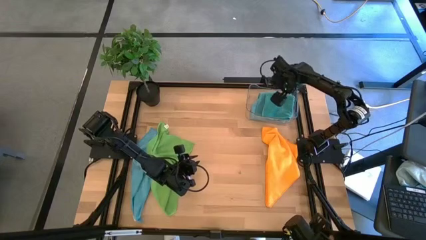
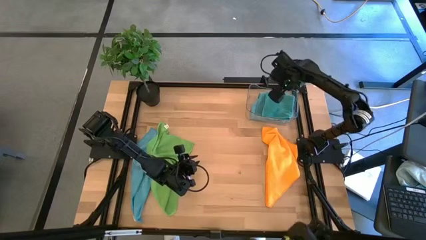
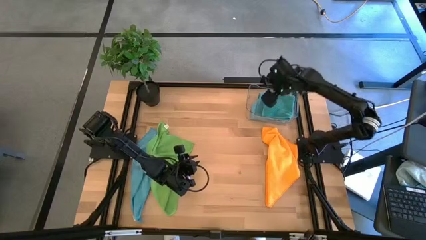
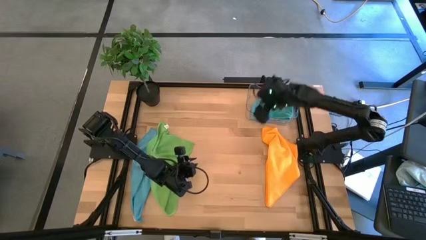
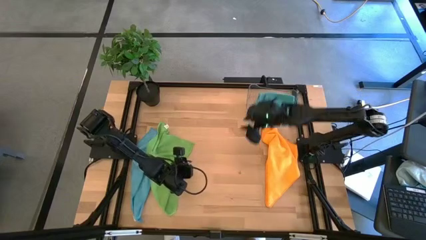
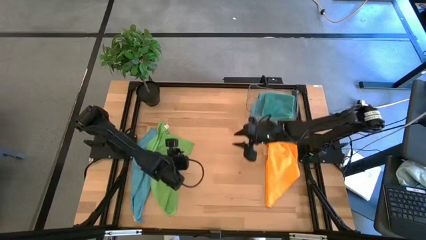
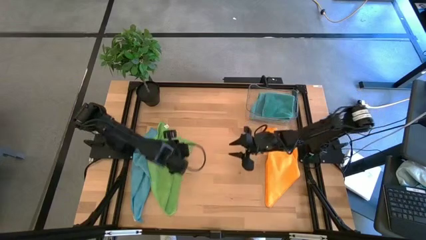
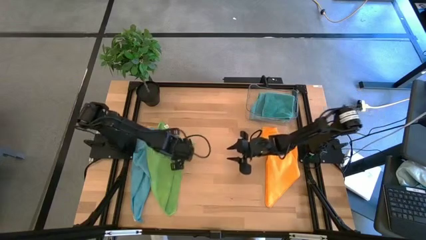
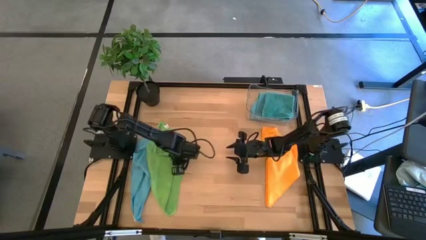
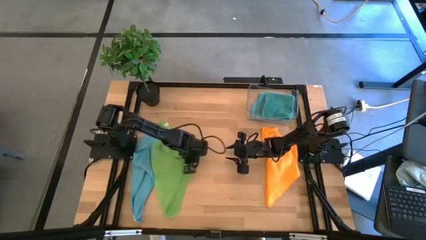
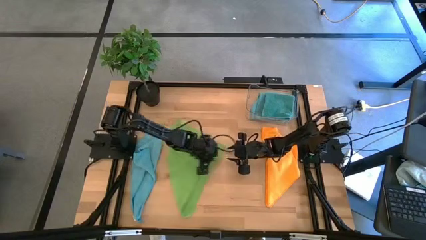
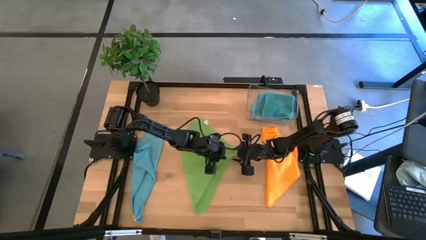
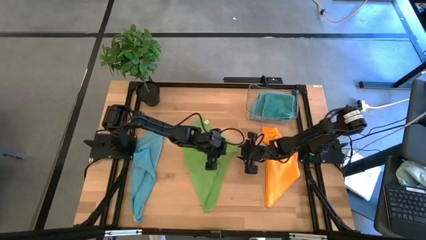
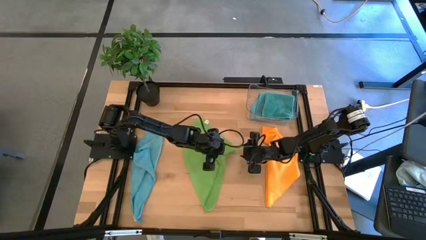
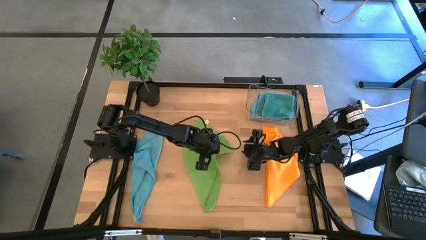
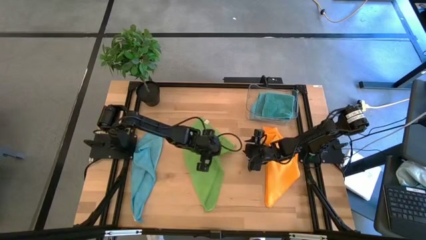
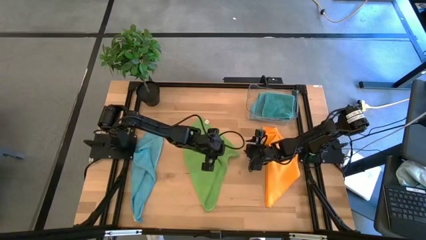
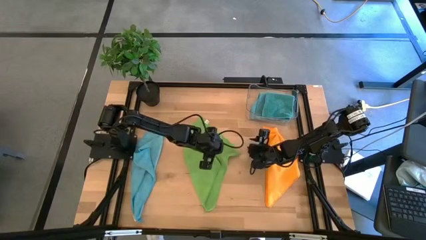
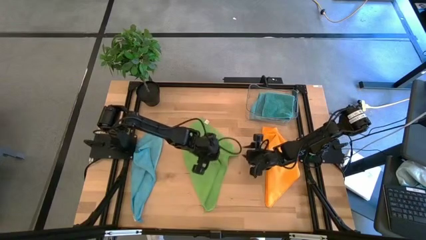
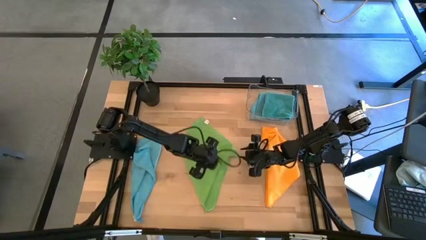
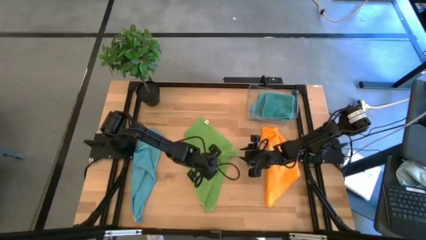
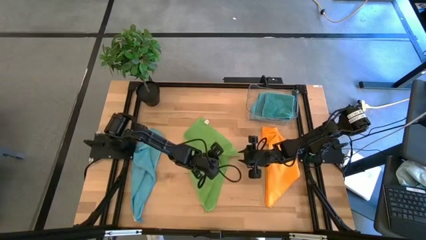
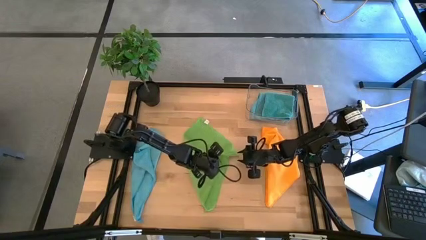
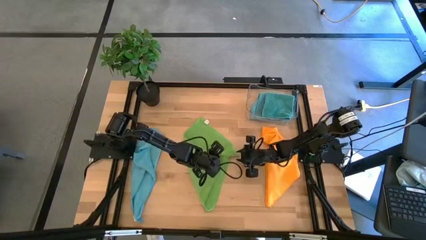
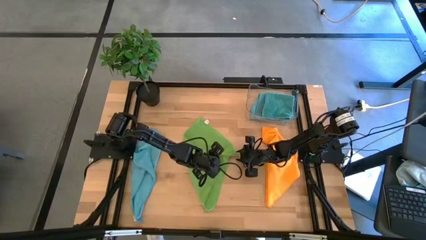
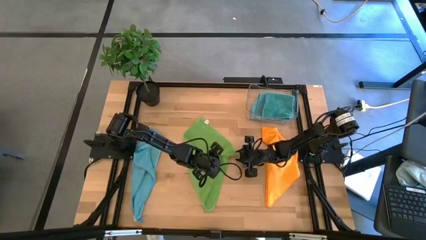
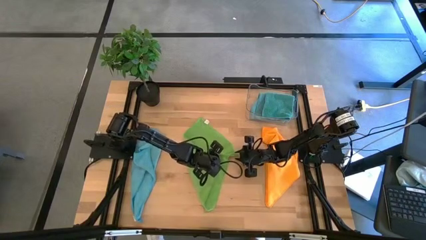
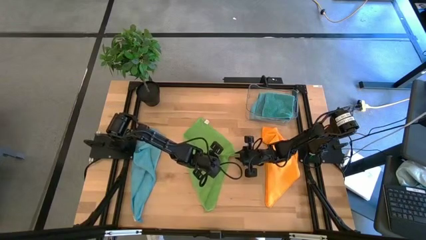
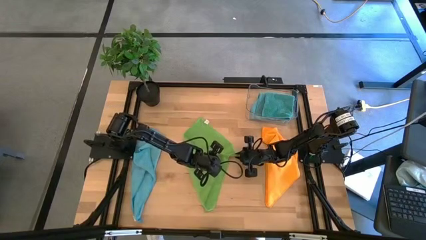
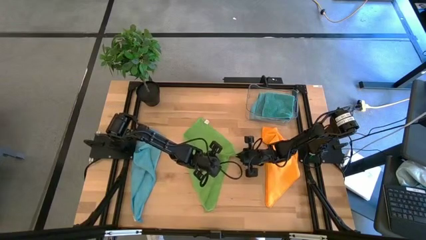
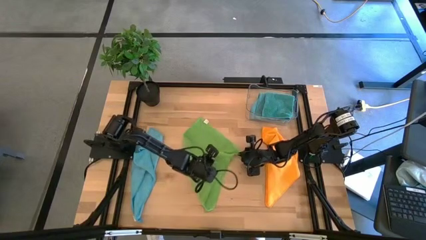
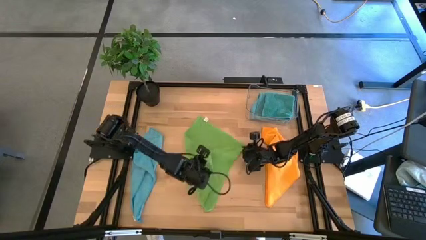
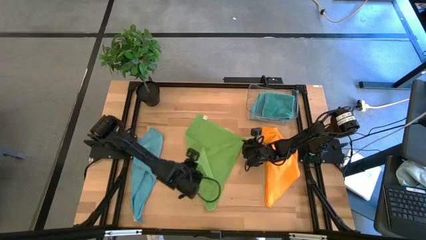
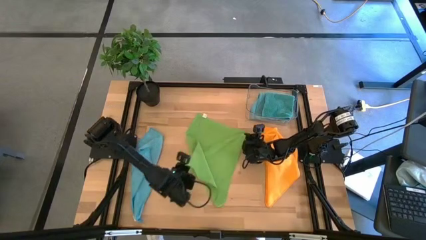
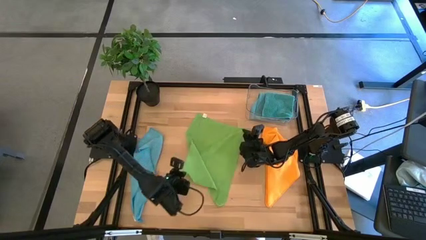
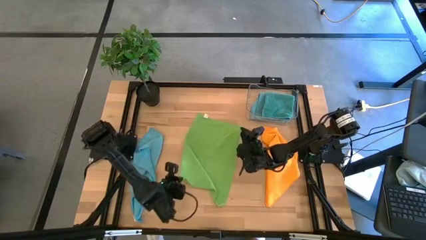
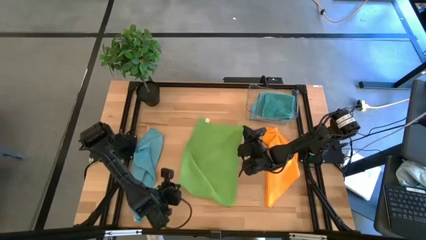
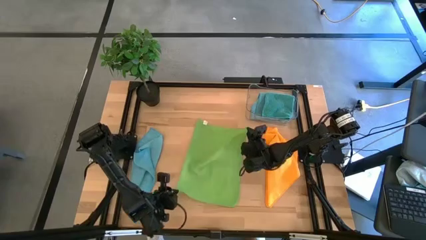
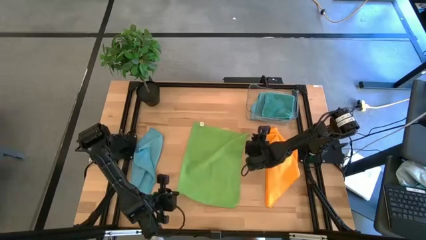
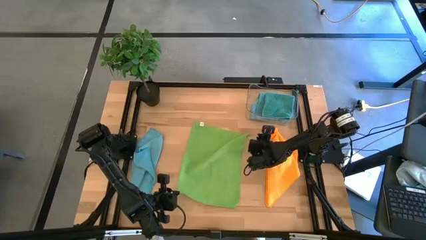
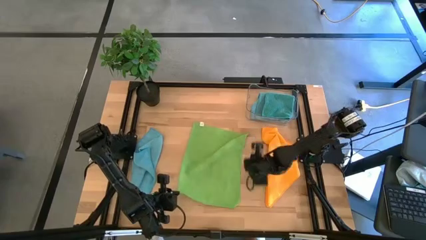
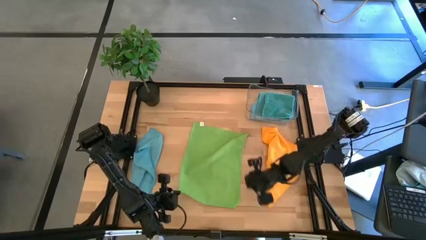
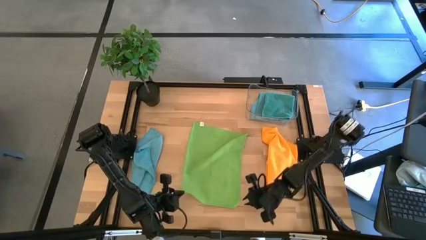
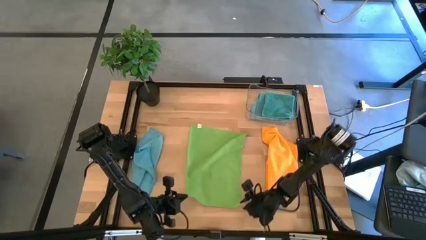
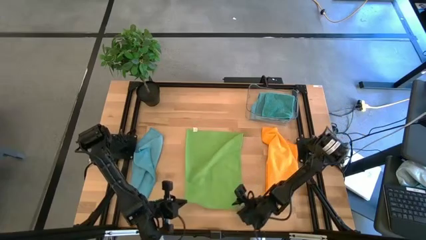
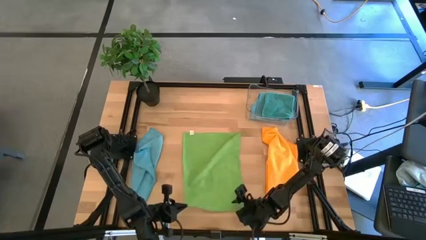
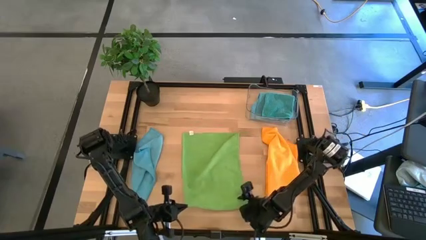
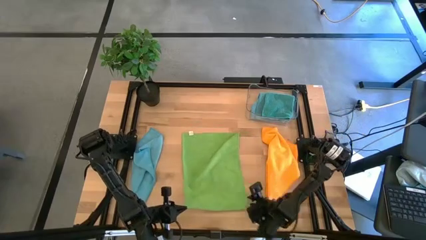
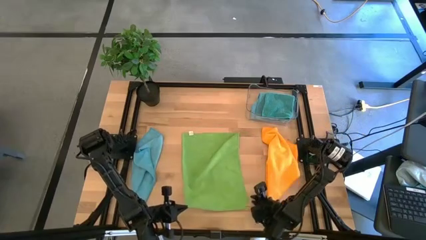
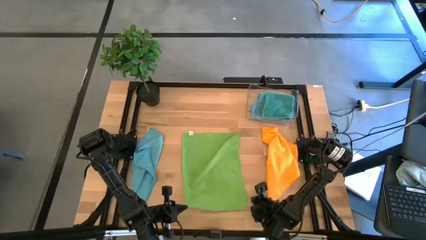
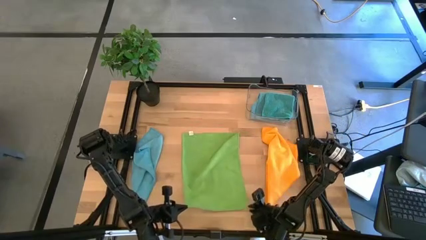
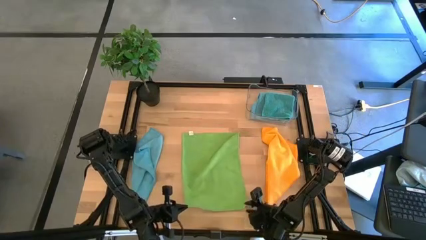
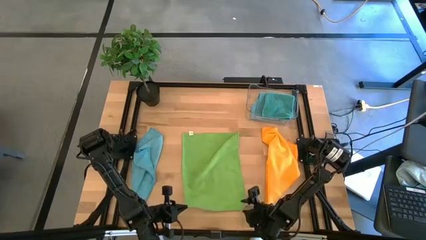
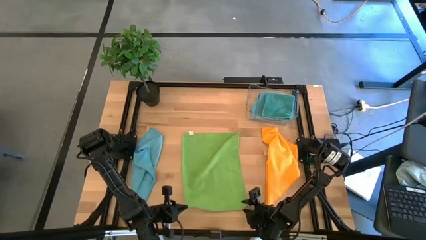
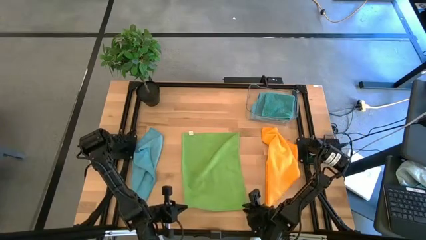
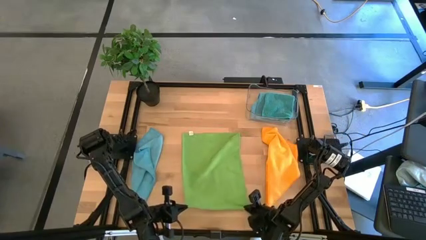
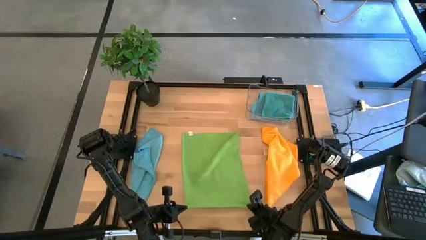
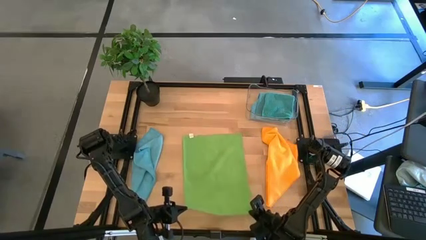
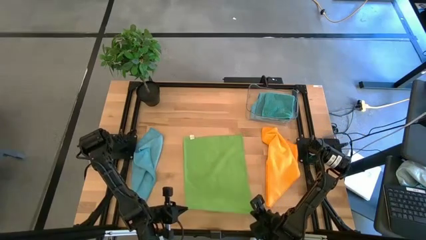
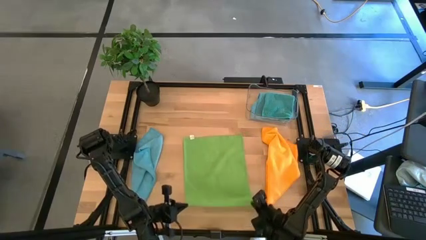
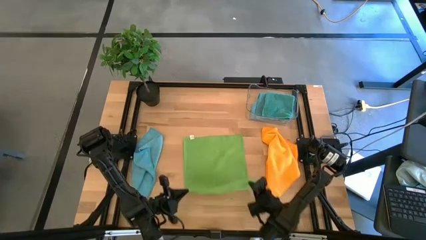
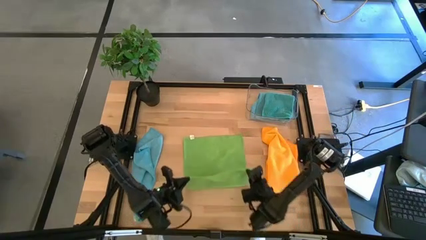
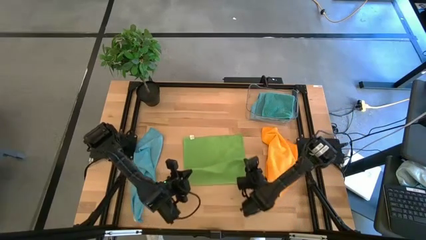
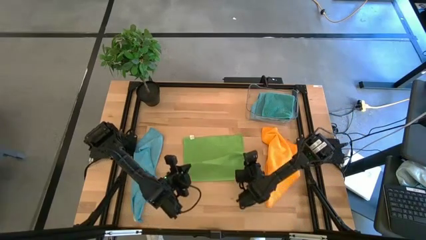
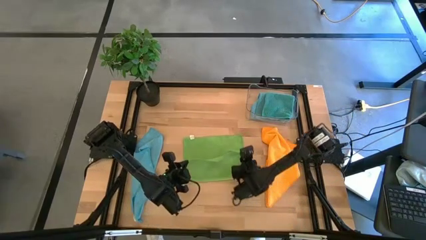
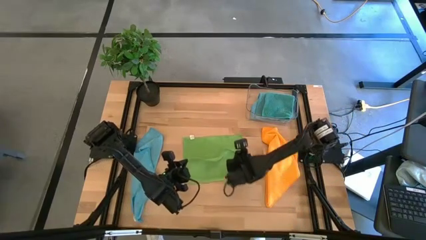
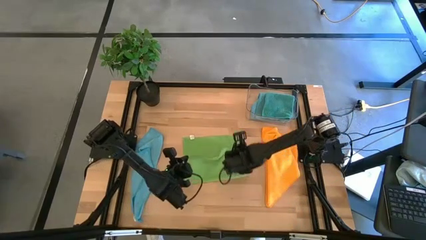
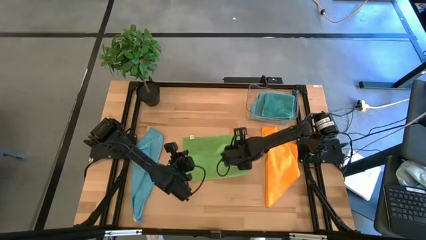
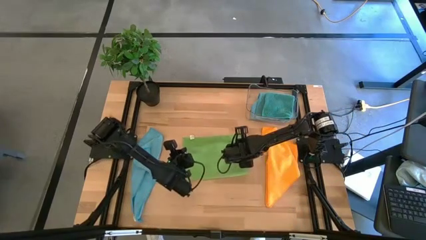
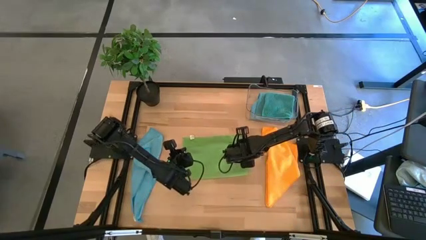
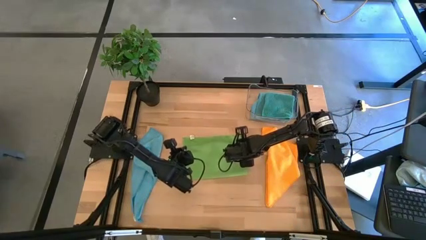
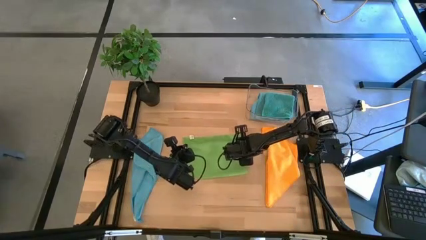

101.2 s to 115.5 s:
Task: Fold microfiber towels
Fold the green microfiber towel

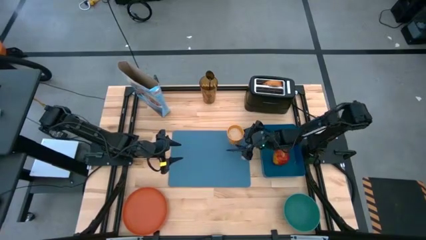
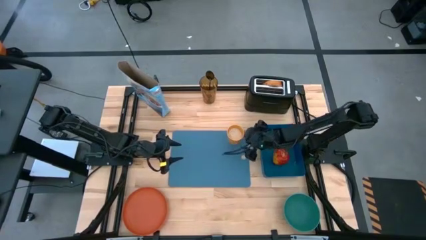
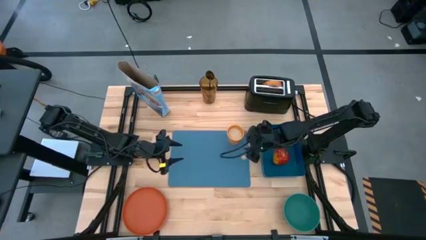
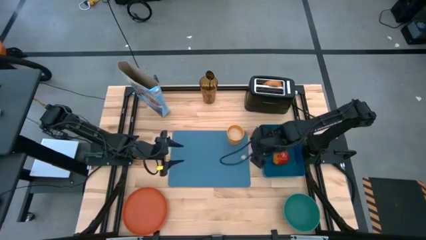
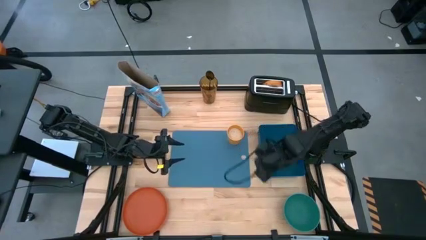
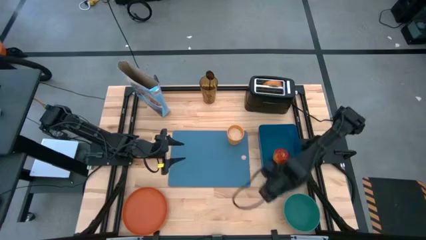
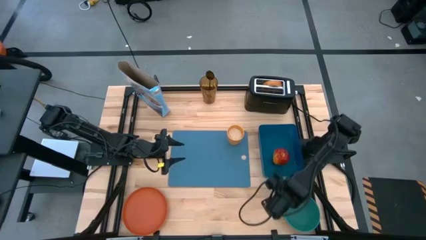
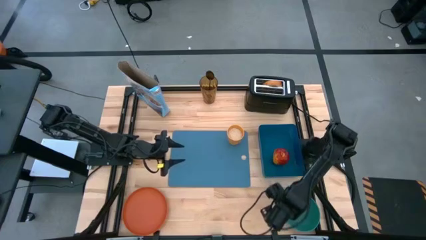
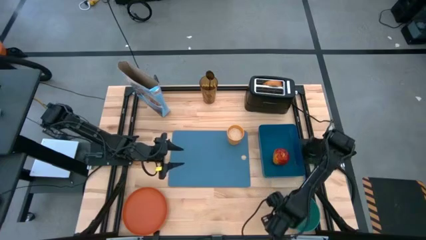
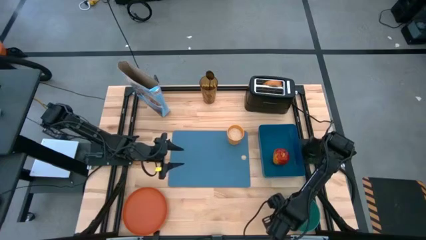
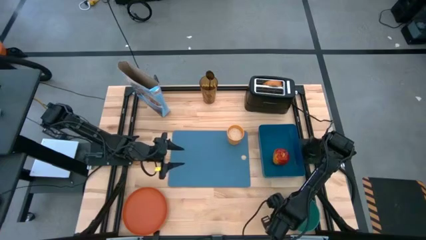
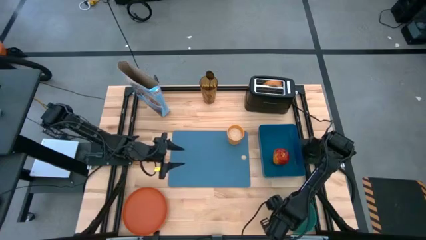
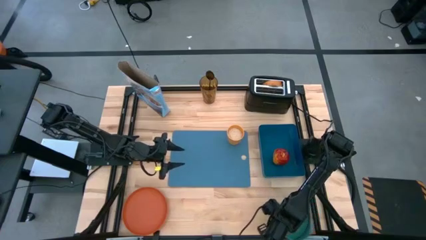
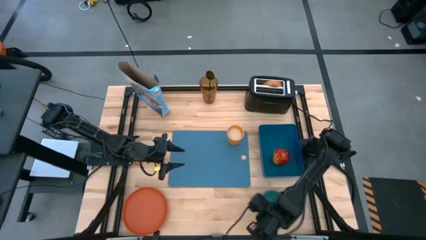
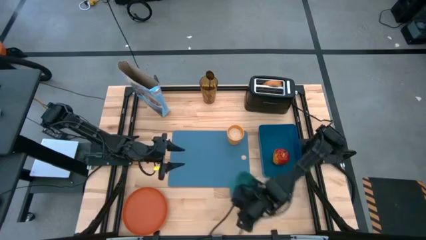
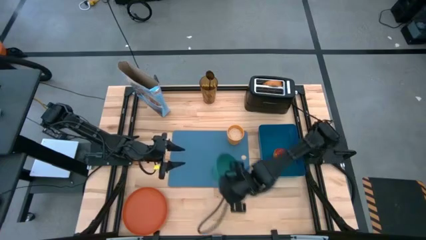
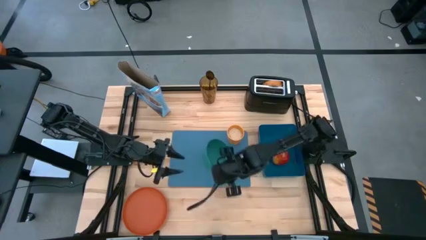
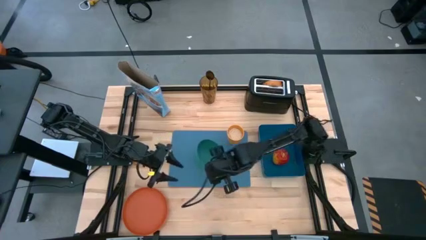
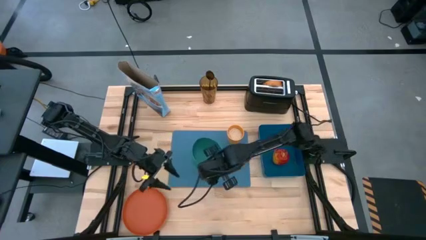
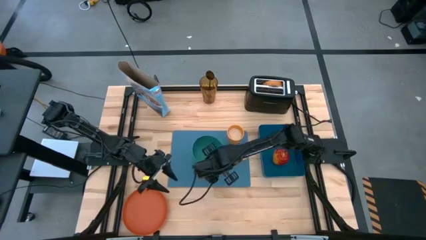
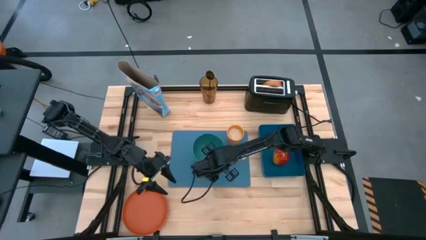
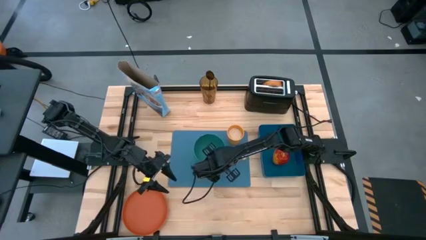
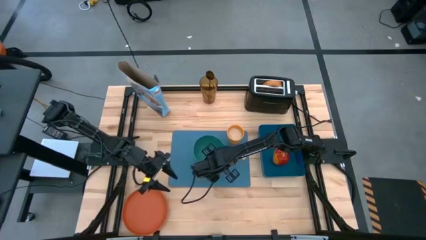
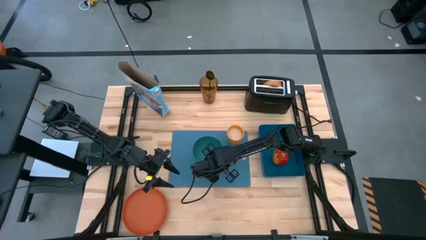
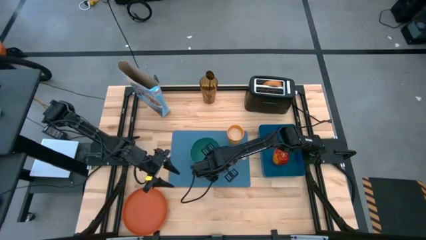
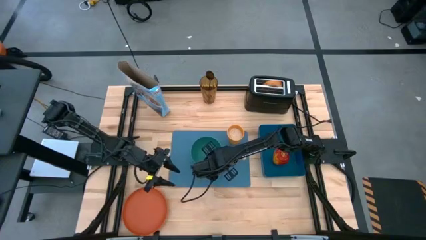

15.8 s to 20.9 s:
Task: Arrange a breakfast setting
Put the green bowl on the light blue mat
